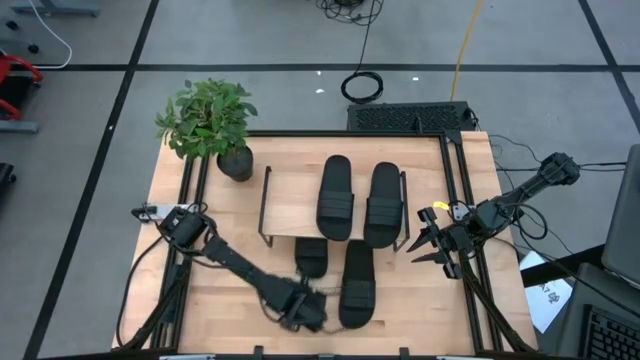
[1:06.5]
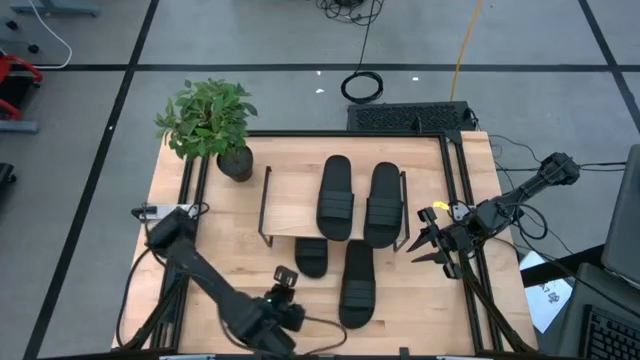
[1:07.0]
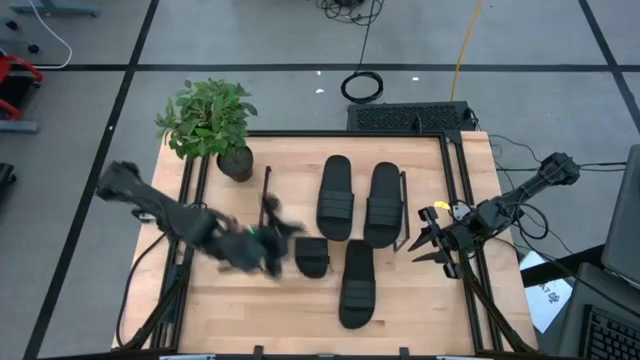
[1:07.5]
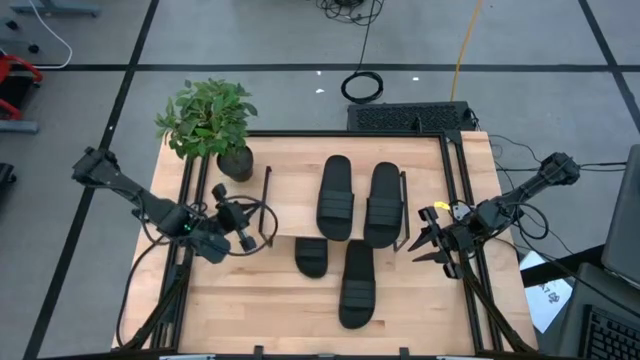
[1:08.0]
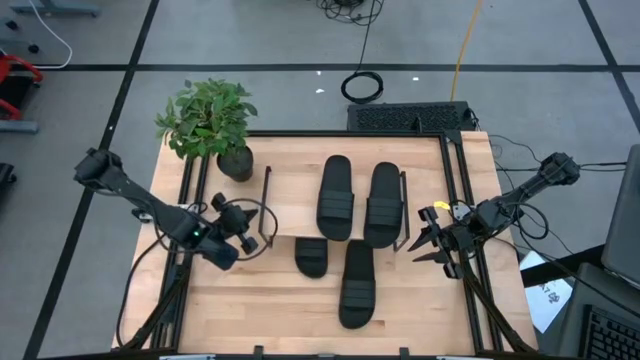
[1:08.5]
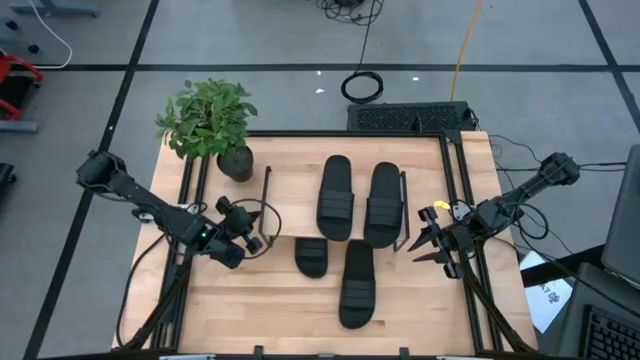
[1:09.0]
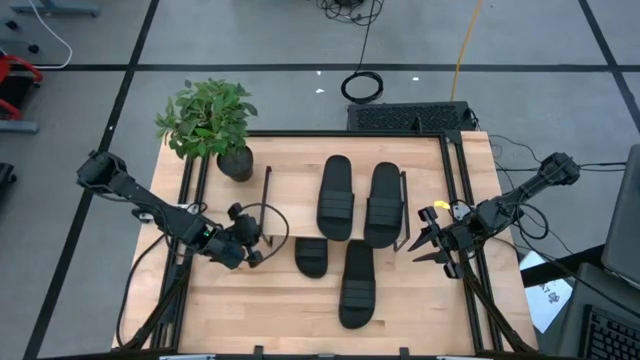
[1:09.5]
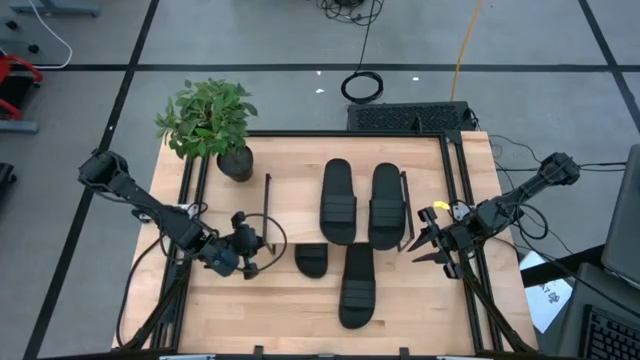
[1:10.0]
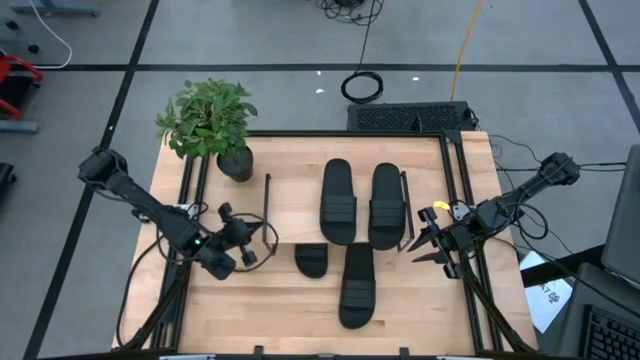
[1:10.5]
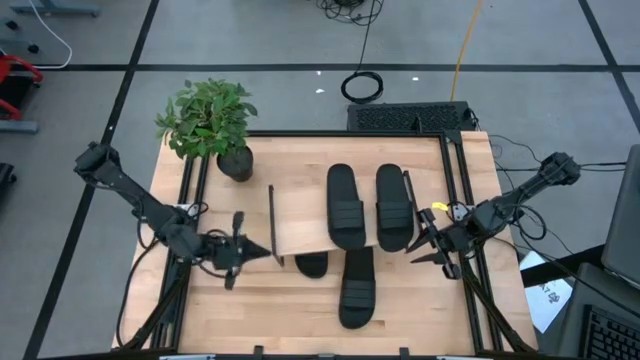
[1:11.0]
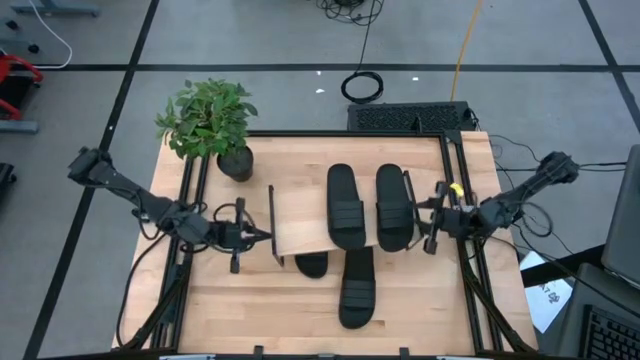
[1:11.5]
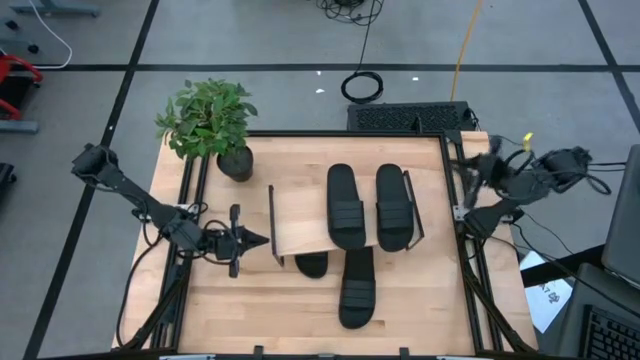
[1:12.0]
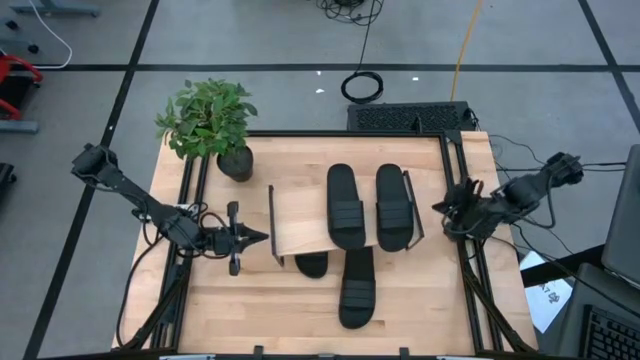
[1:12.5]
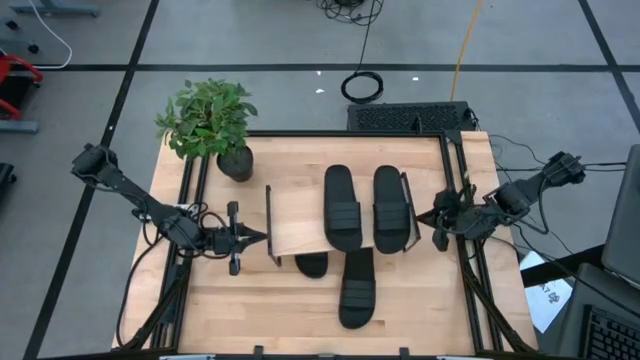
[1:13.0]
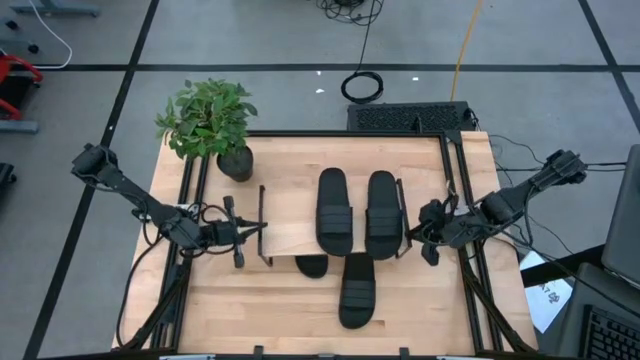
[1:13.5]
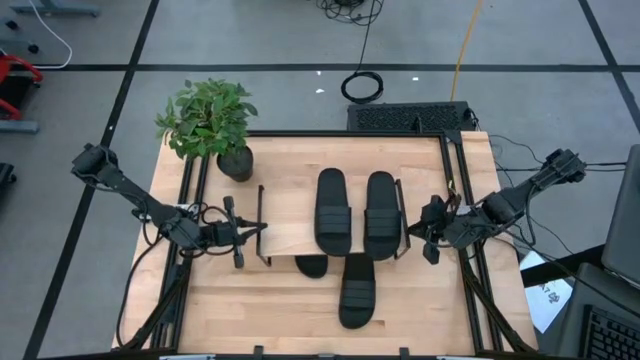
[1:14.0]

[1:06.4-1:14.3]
Task: Pick and place slides into the shelf
Adjust the shelf on the table

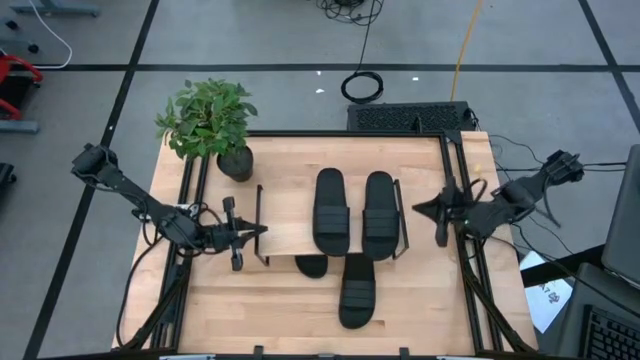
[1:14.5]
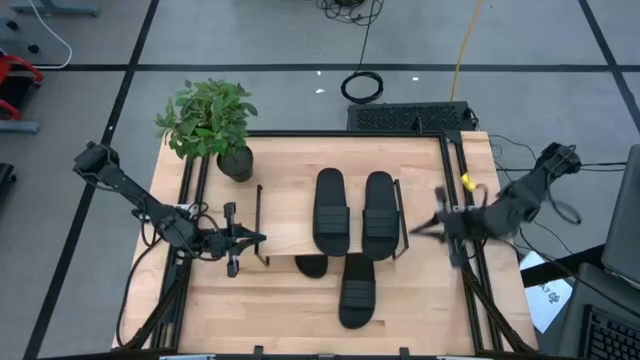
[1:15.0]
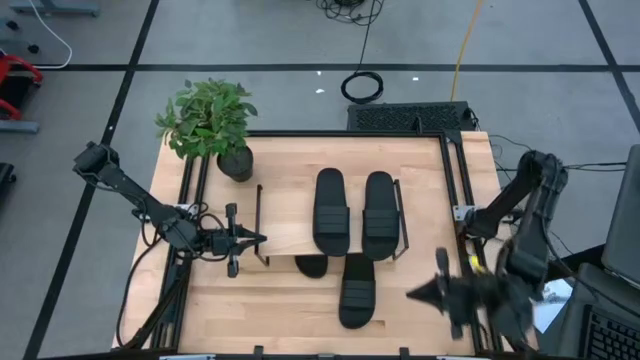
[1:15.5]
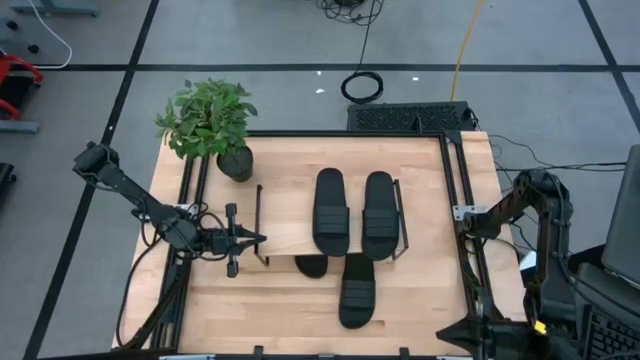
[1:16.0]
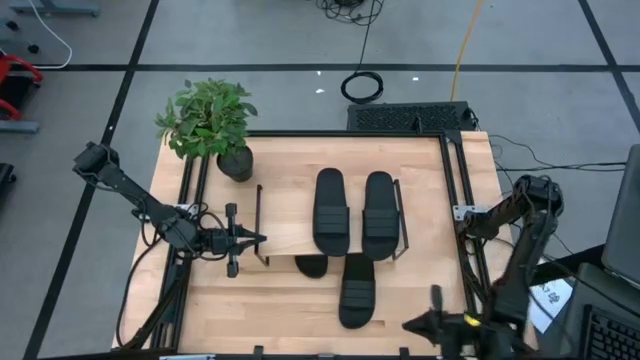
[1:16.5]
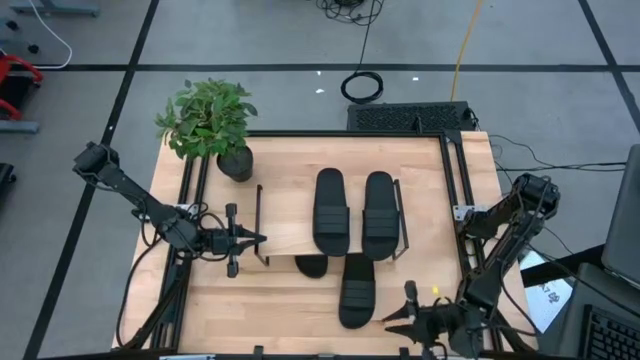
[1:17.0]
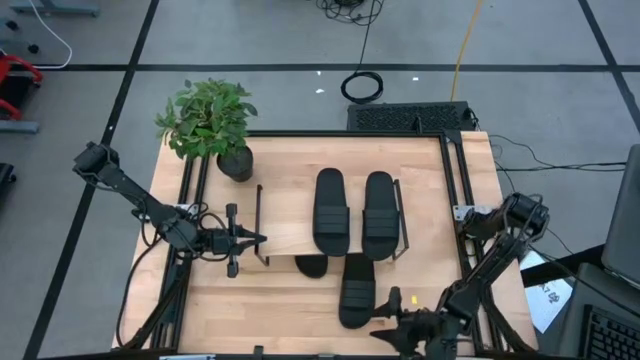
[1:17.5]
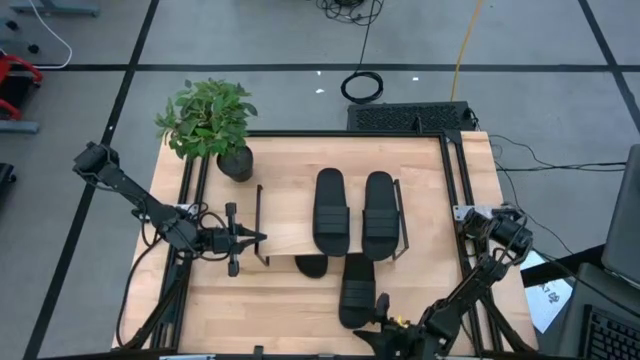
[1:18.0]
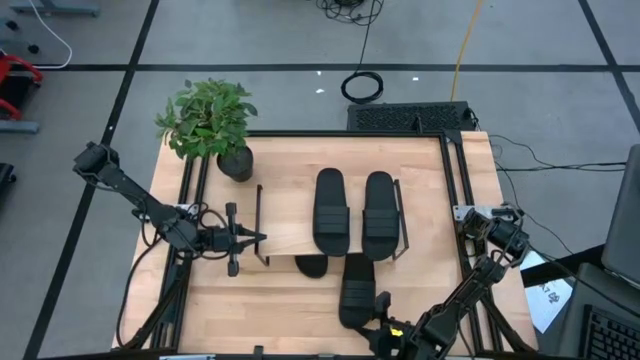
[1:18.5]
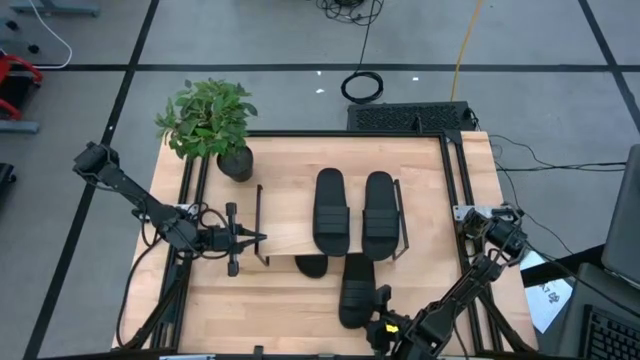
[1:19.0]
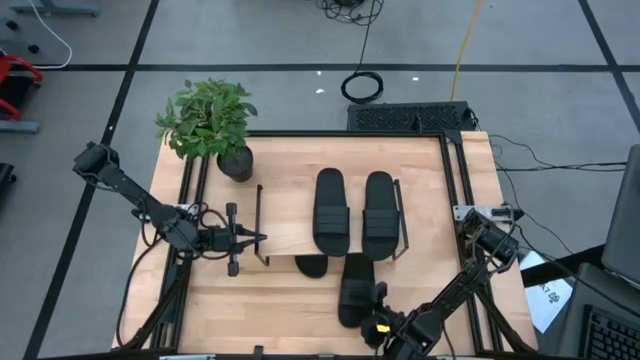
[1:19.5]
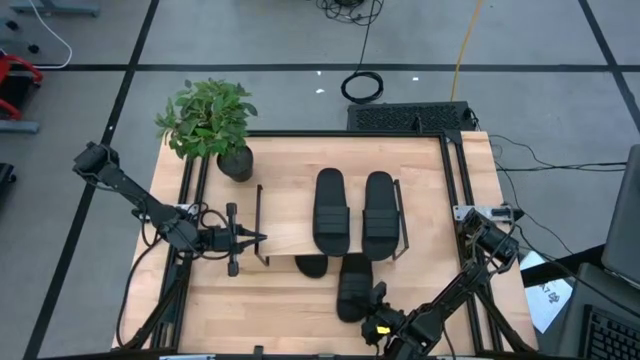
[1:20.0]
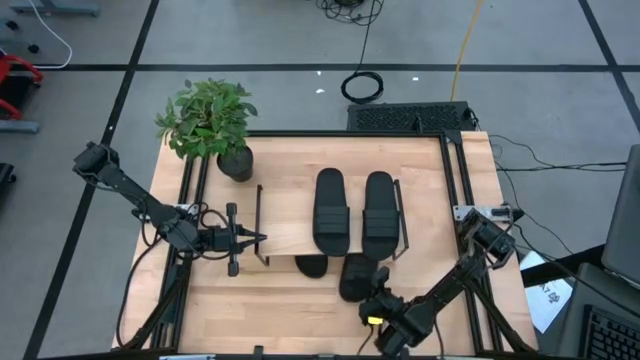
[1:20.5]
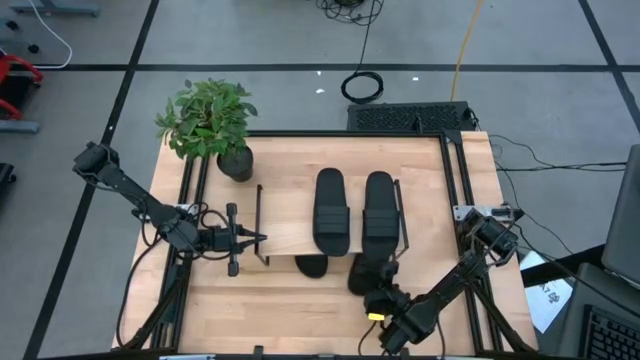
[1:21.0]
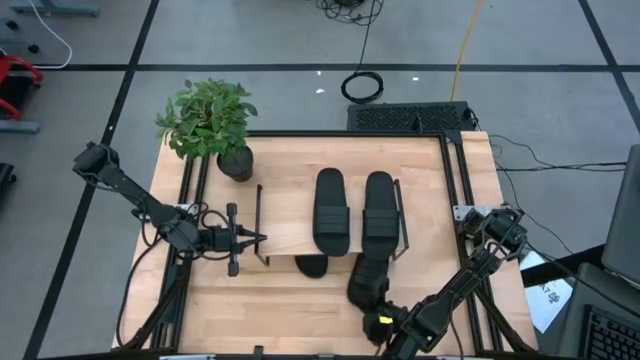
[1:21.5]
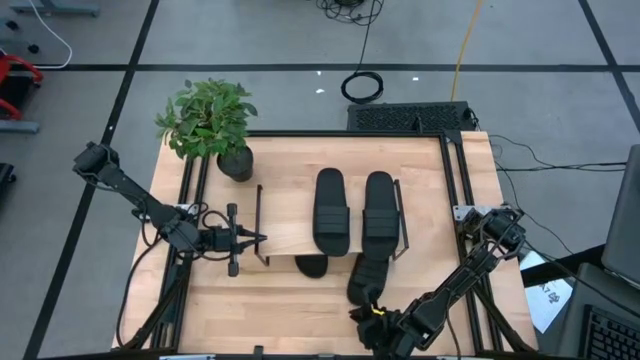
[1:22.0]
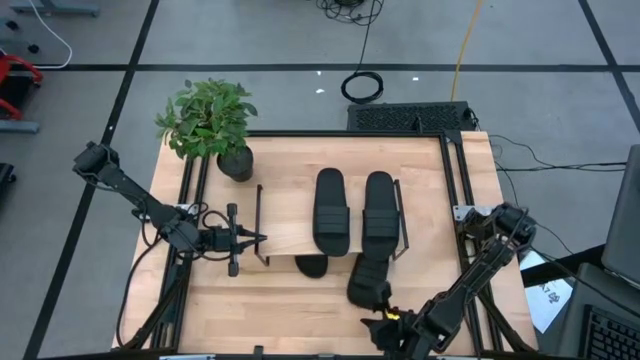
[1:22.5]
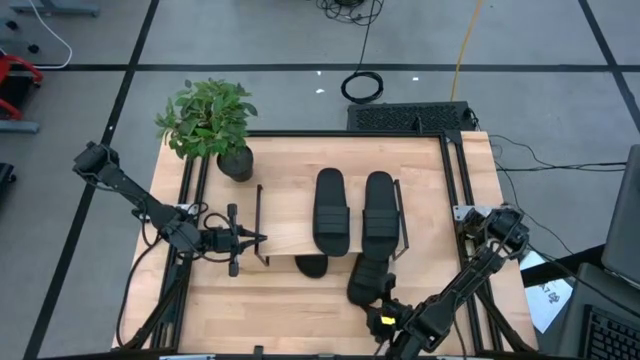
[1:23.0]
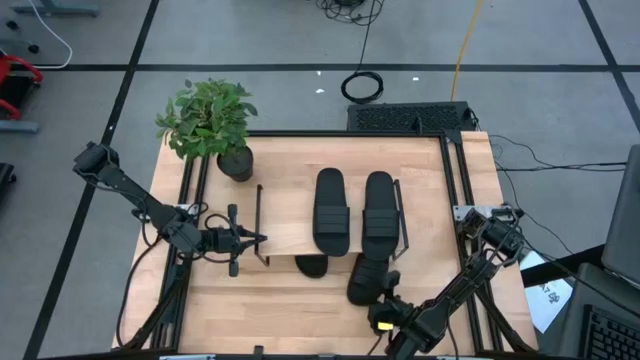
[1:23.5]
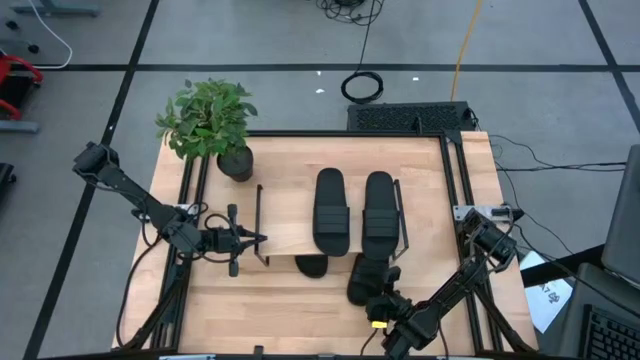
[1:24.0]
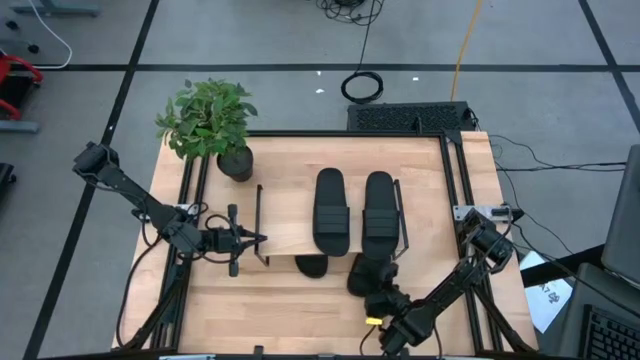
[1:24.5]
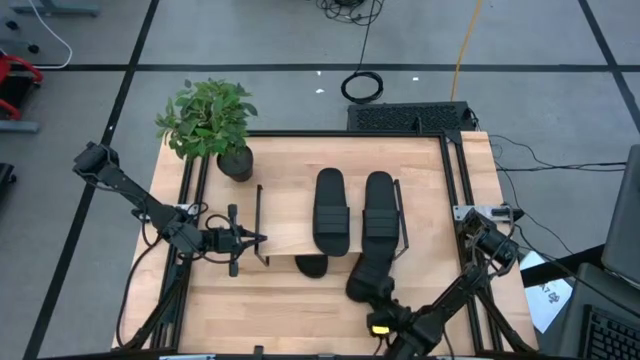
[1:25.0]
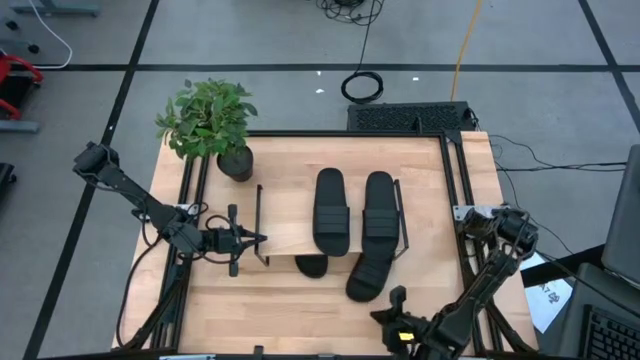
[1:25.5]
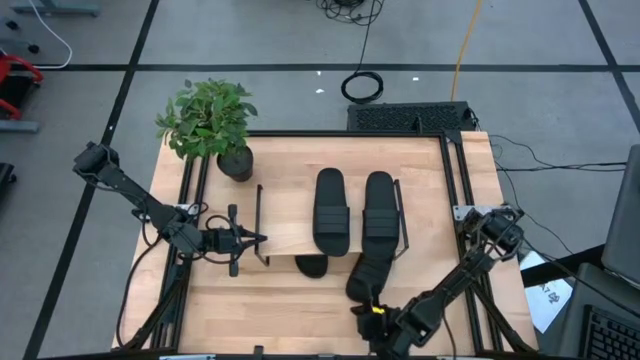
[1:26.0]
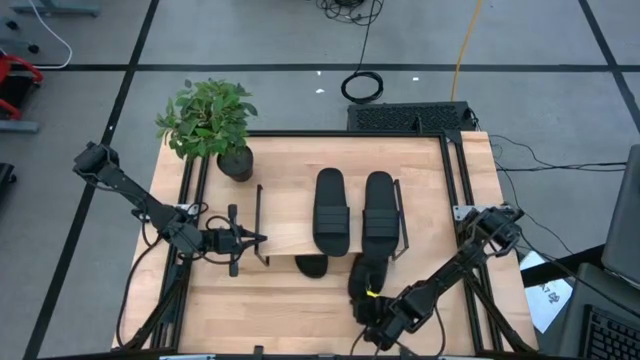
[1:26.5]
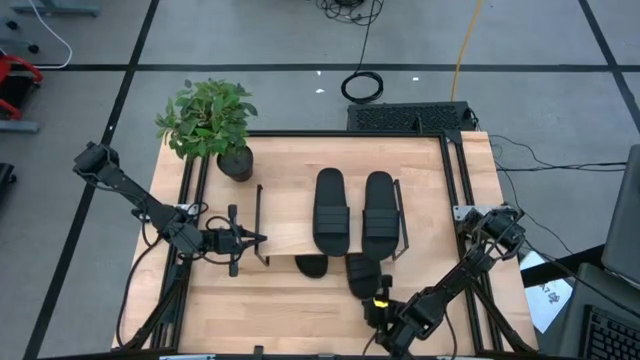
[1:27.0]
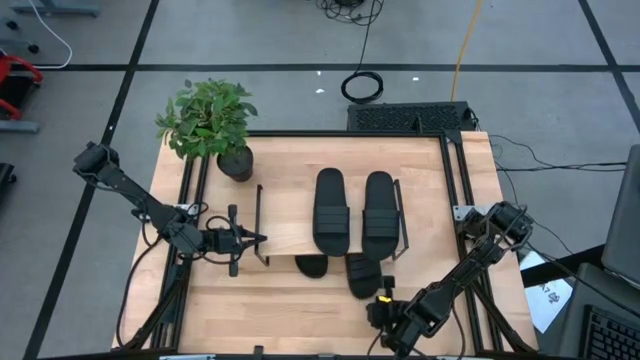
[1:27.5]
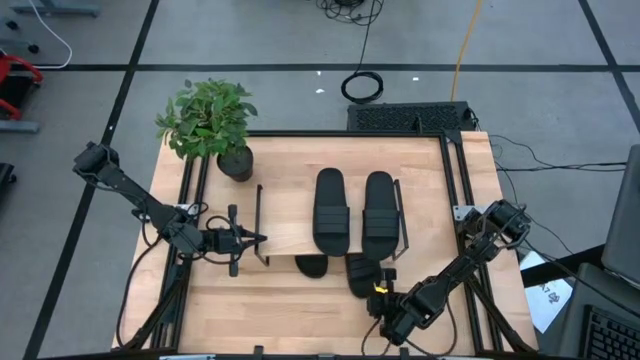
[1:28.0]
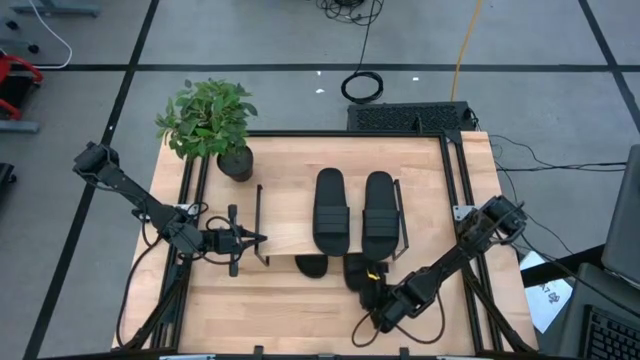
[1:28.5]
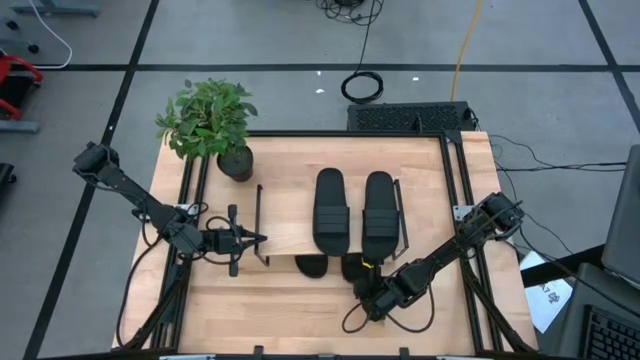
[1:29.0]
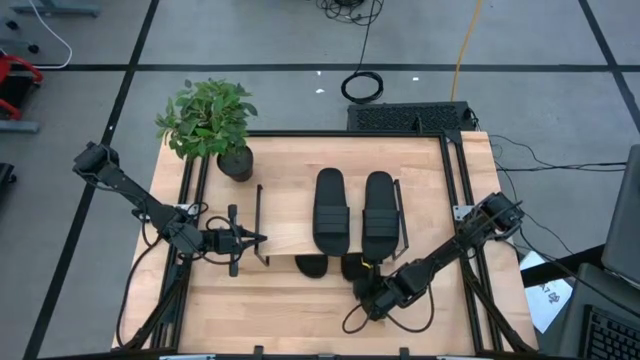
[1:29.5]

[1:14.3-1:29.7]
Put the black slipper under the shelf
